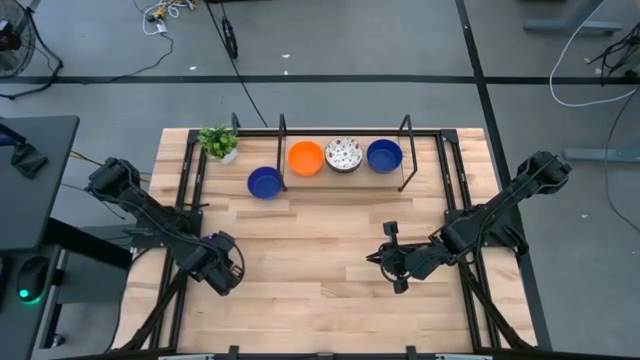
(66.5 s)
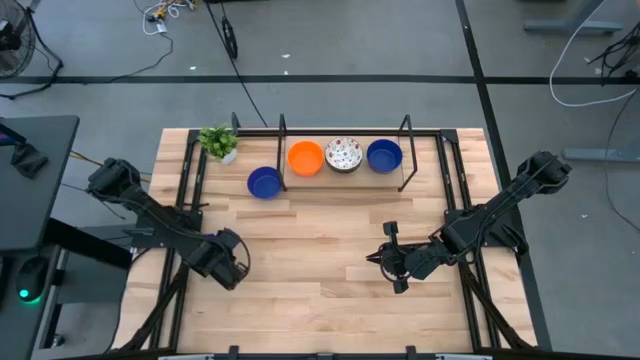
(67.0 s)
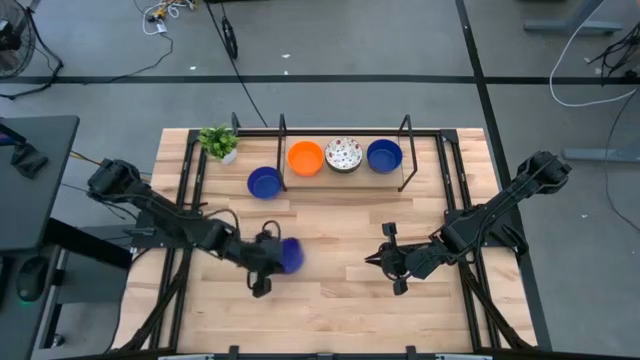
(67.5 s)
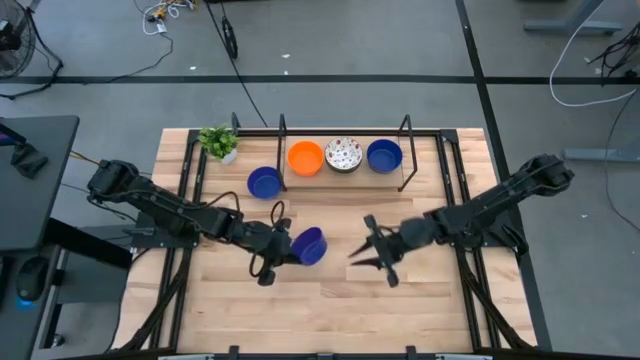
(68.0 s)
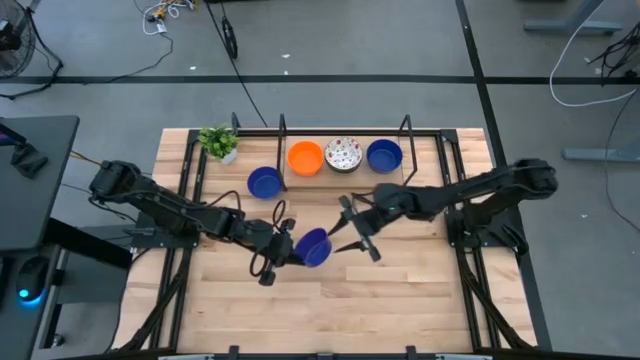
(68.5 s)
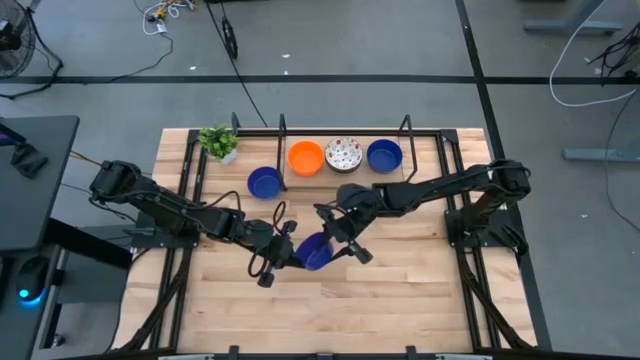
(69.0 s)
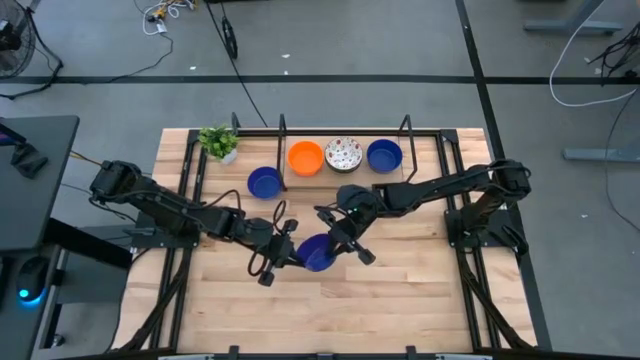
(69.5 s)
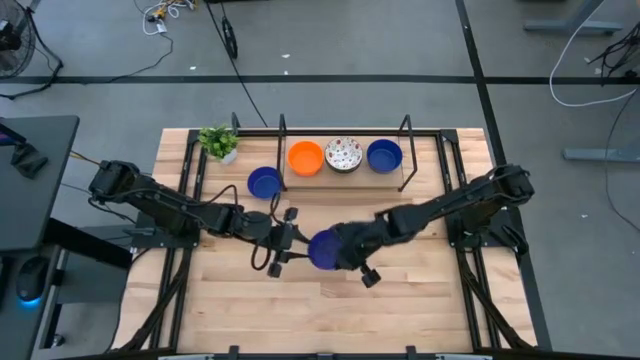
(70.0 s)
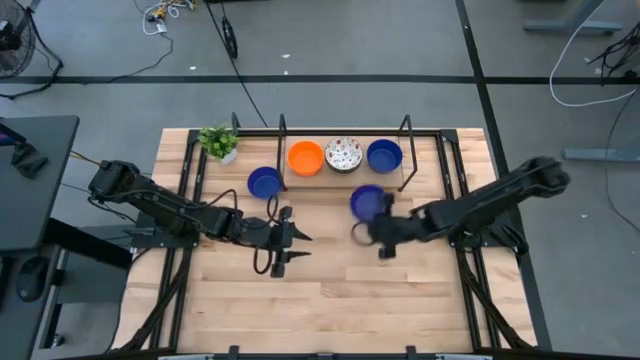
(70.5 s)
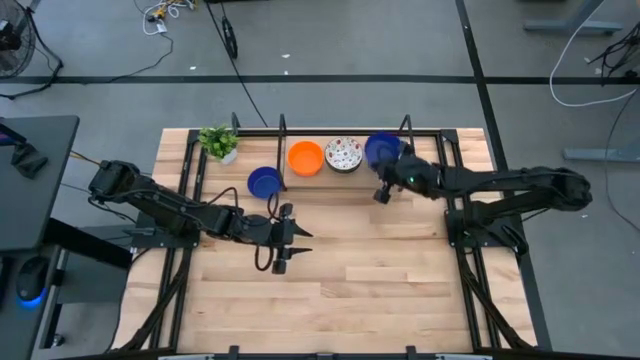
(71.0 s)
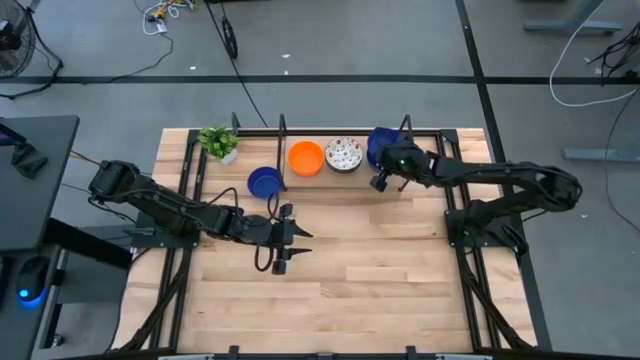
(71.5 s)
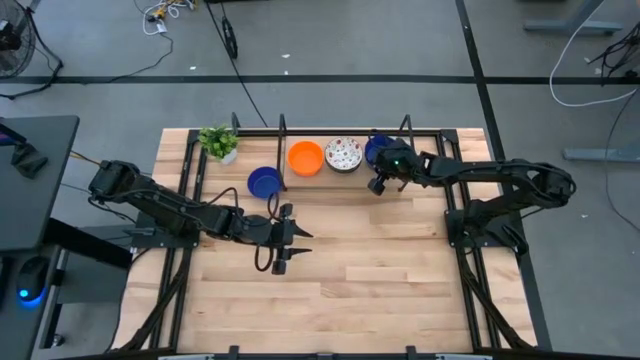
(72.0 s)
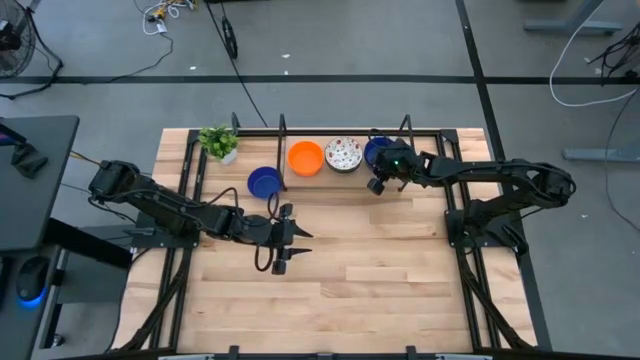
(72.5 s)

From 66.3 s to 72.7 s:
Task: Pick & Place Mini bowls
Stack the blue bowl on top of the blue bowl on the shelf

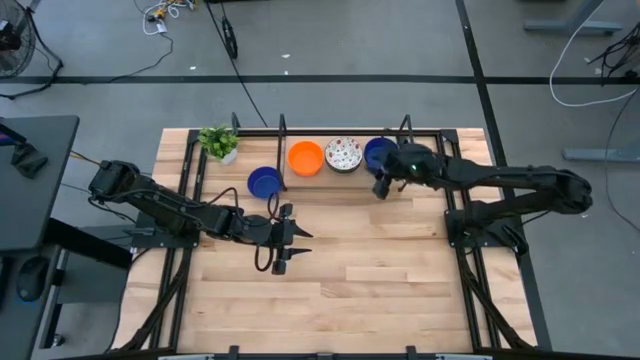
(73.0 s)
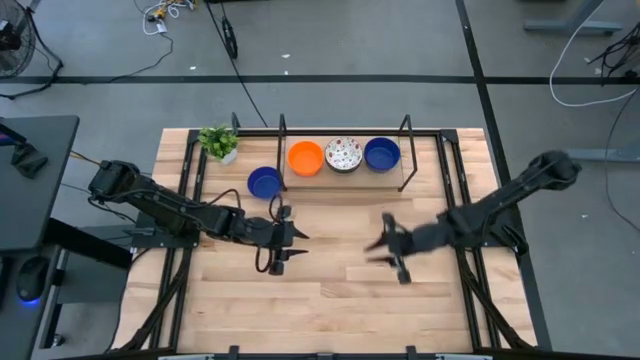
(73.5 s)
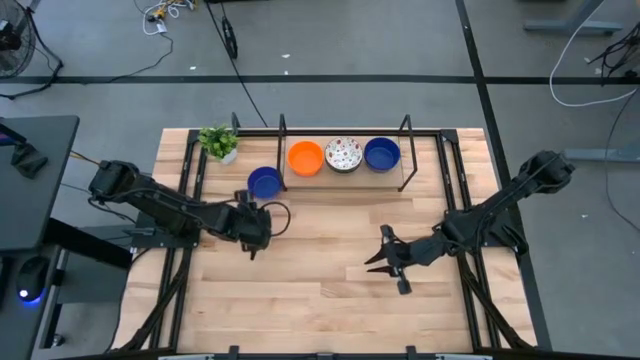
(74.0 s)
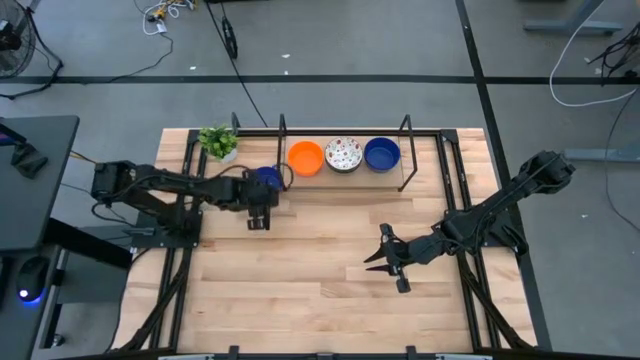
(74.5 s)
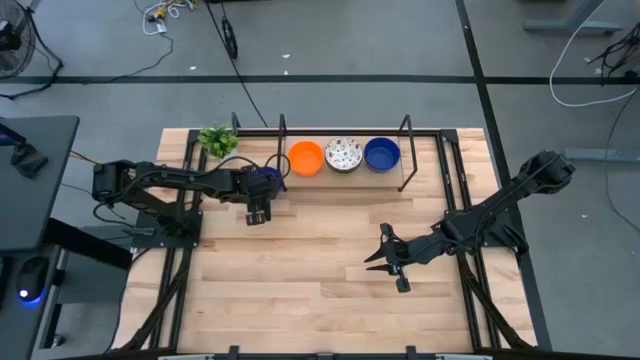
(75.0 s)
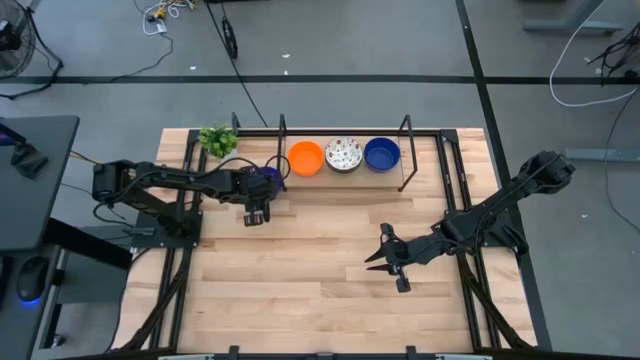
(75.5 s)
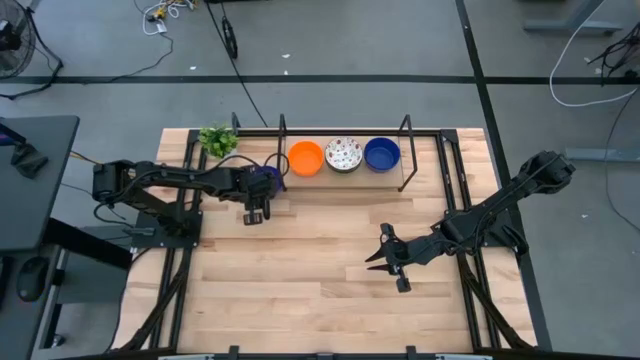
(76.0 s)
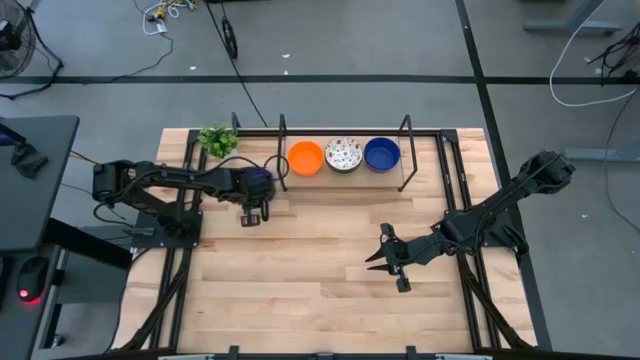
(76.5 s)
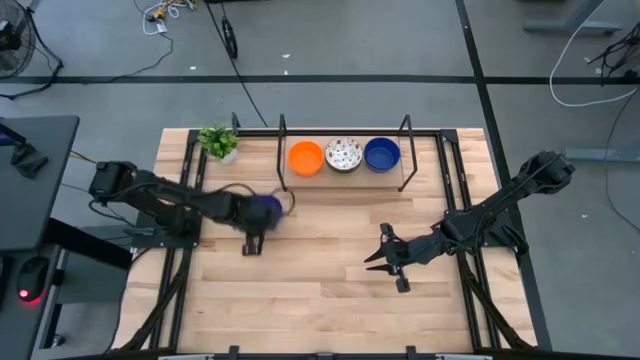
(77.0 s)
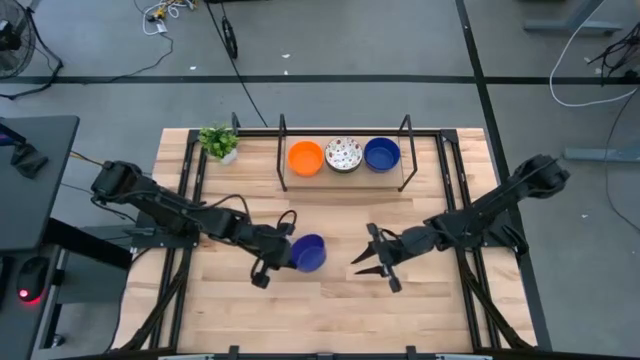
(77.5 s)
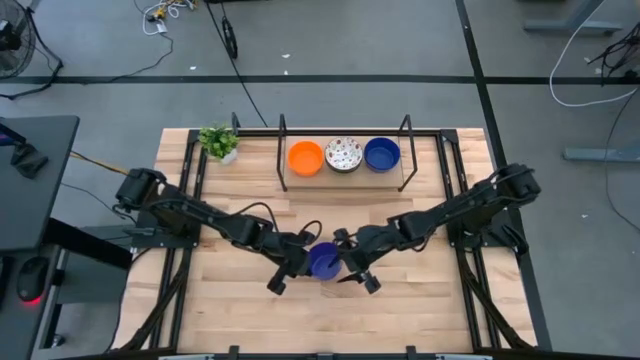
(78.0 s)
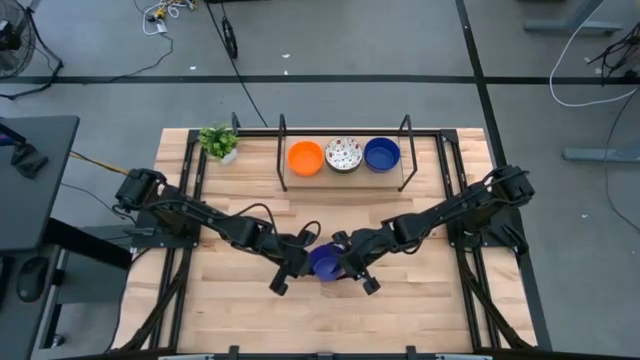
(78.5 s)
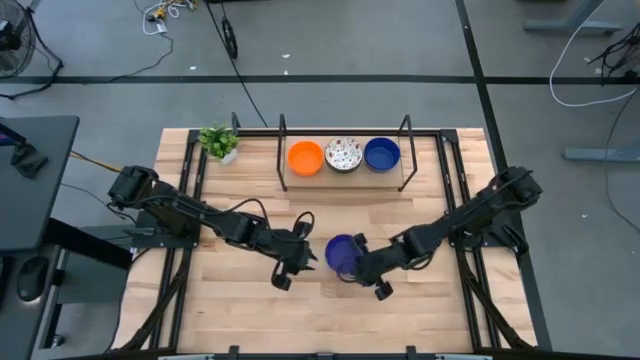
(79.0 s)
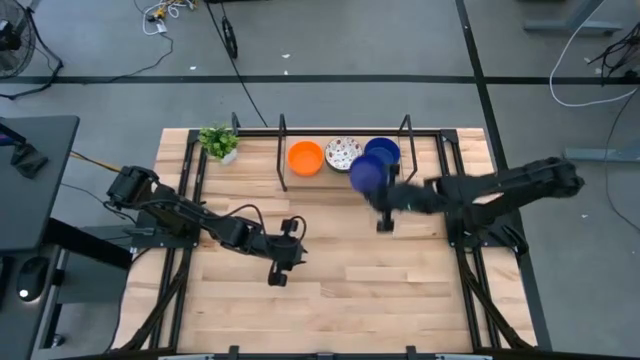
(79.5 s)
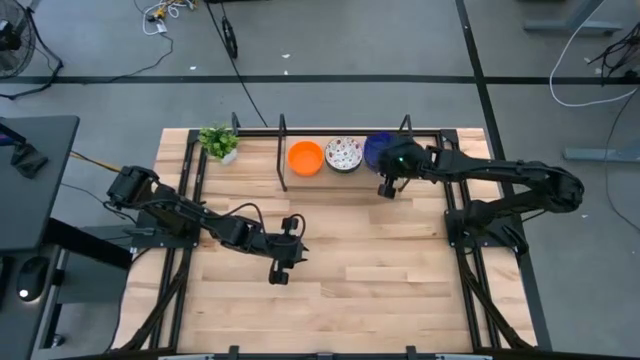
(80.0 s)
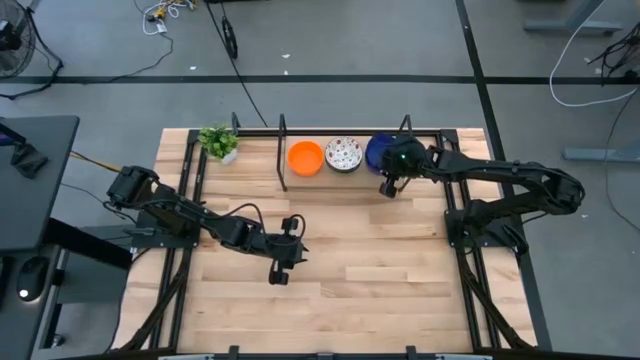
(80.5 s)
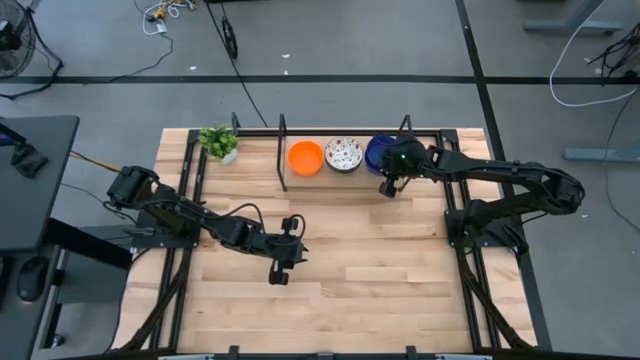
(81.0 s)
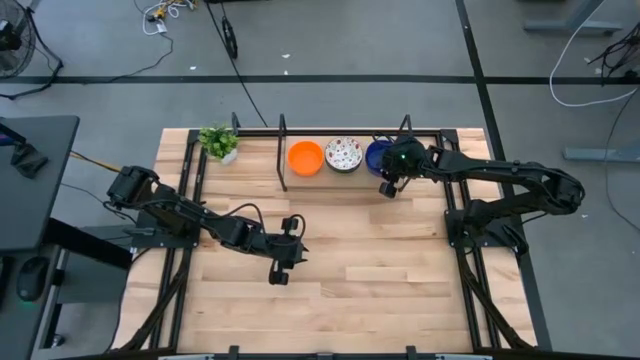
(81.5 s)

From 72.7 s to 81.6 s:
Stack the blue bowl on top of the blue bowl on the shelf

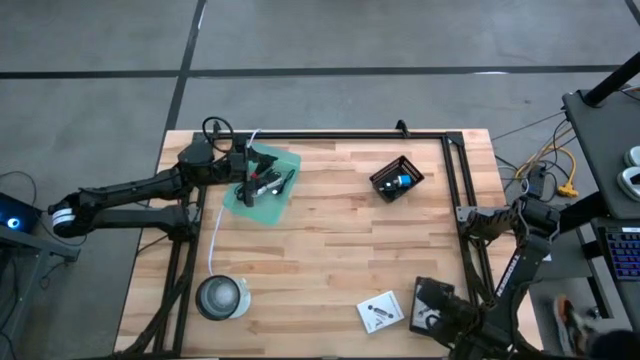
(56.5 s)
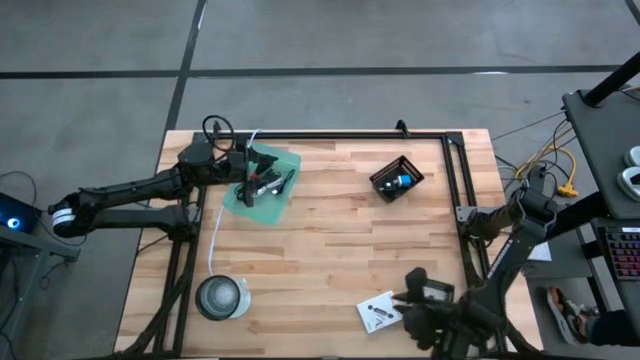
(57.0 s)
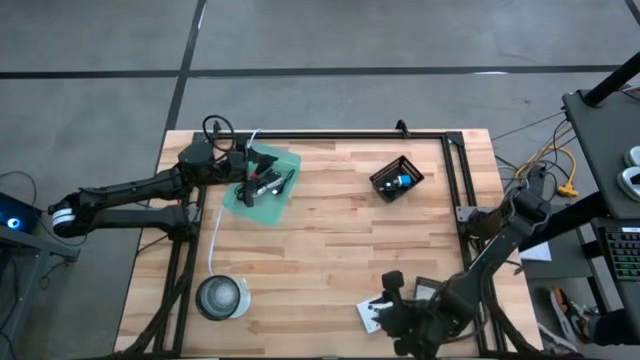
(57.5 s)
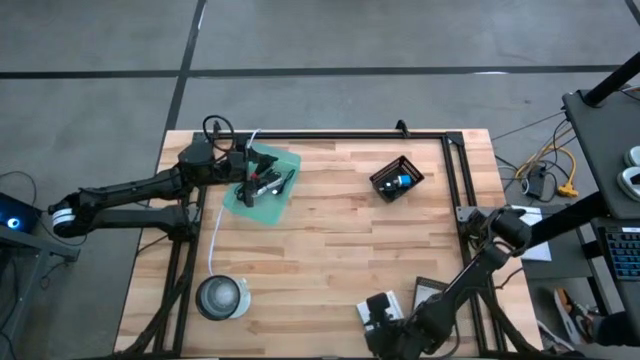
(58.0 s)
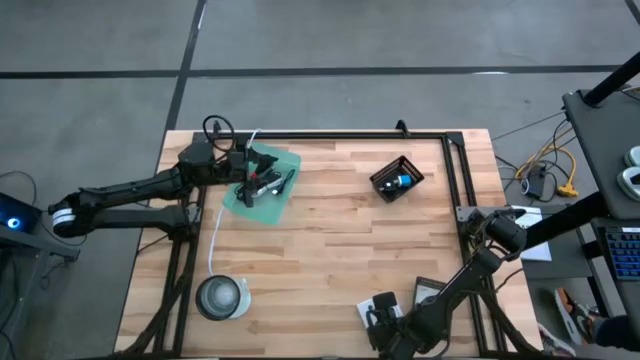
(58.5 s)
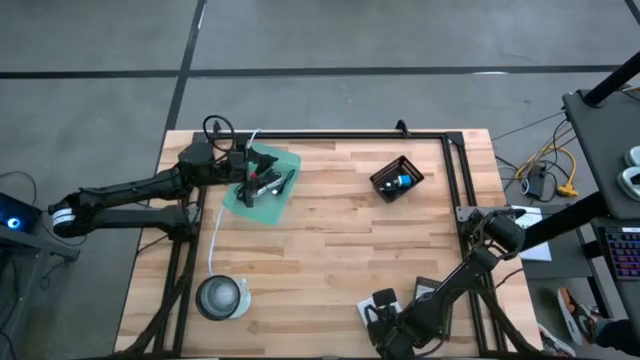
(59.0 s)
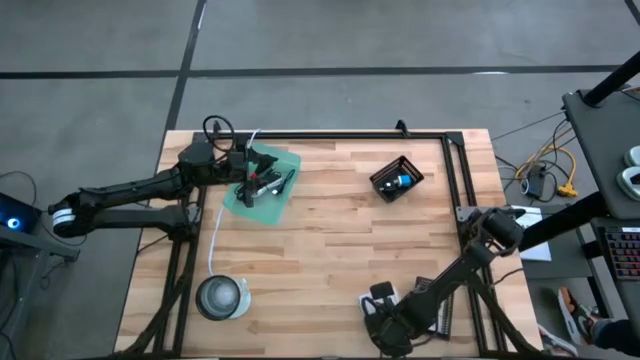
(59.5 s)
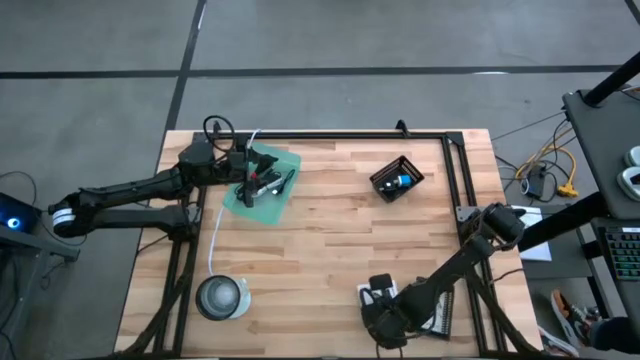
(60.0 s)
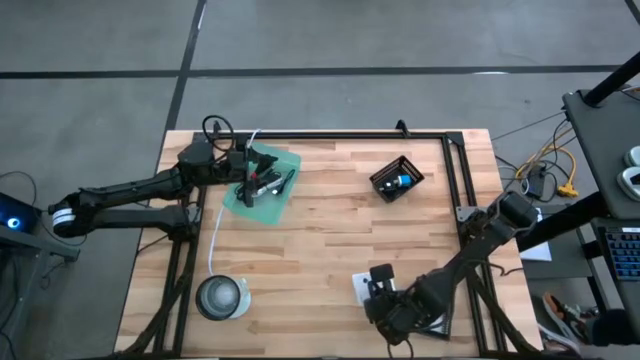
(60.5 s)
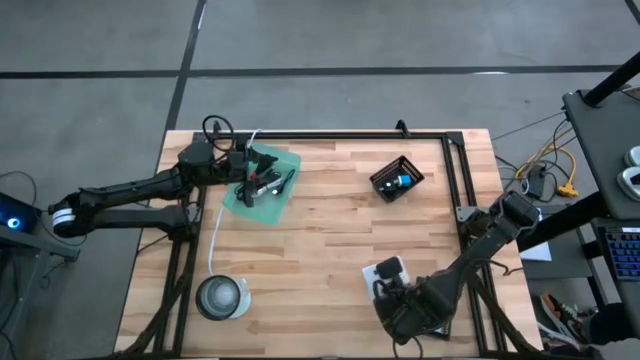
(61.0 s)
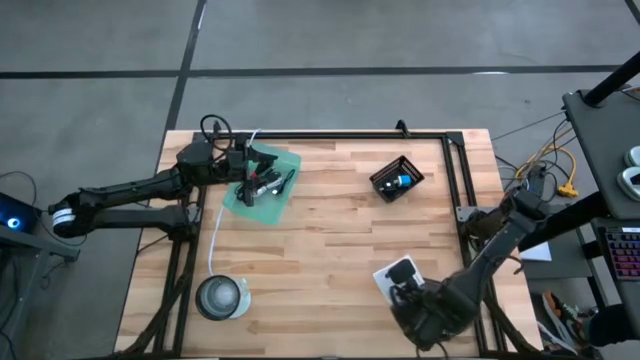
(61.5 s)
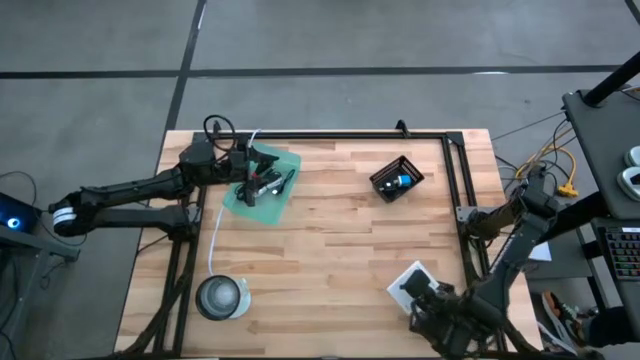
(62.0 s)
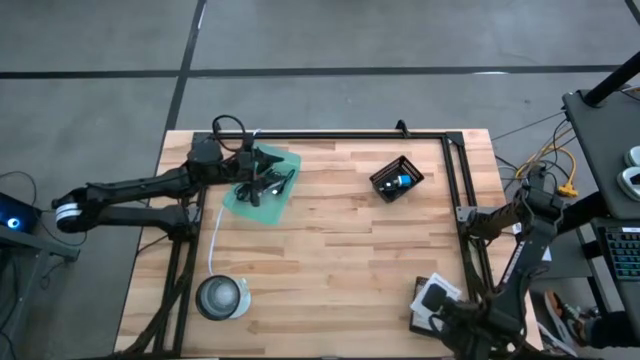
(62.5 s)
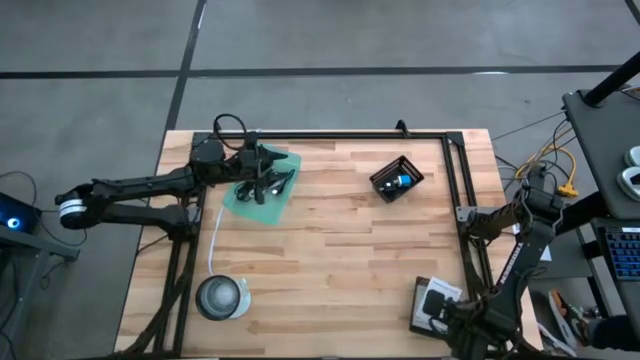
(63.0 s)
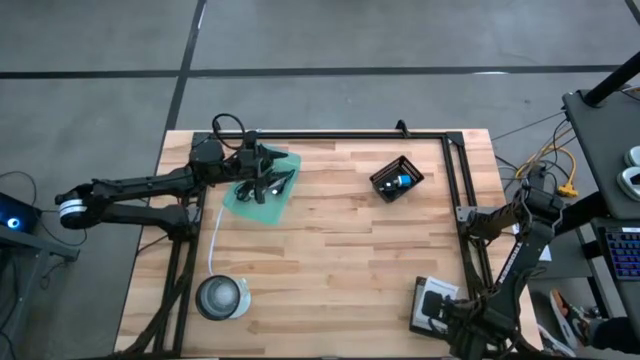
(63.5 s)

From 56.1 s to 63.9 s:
Task: Pick and place items into bin
Put the white card reader box into the bottom black bin
